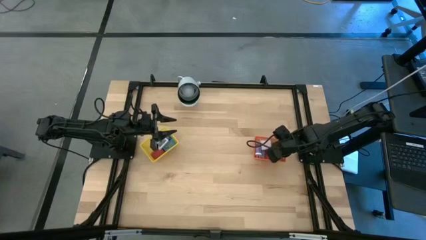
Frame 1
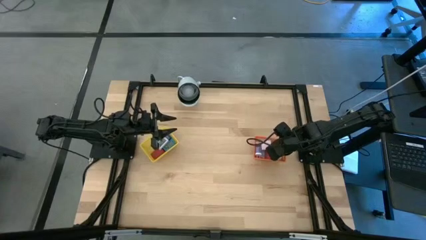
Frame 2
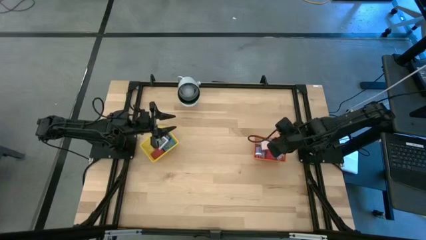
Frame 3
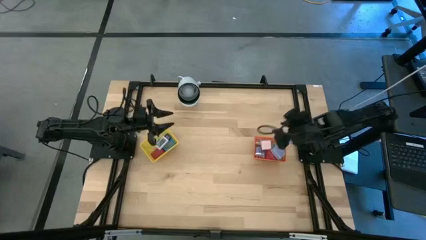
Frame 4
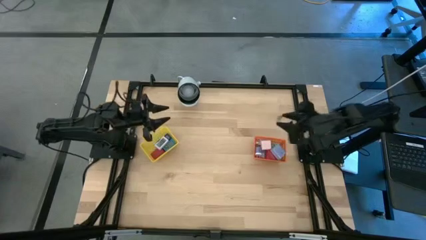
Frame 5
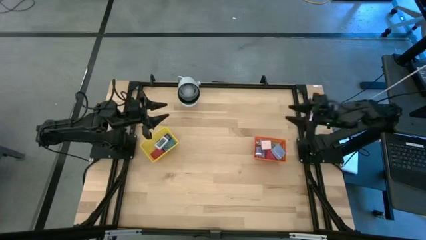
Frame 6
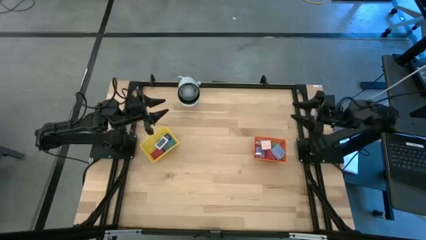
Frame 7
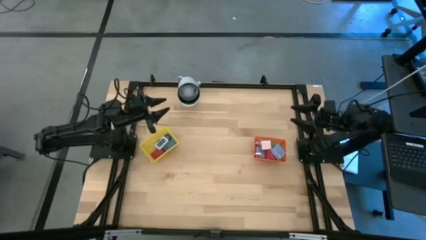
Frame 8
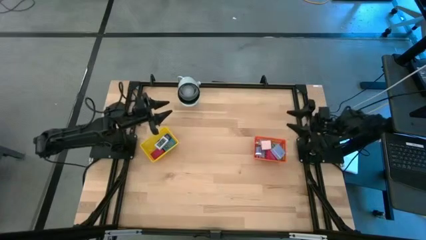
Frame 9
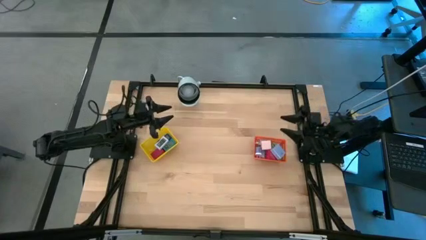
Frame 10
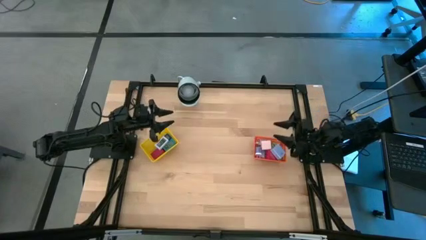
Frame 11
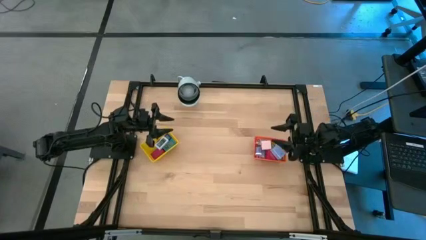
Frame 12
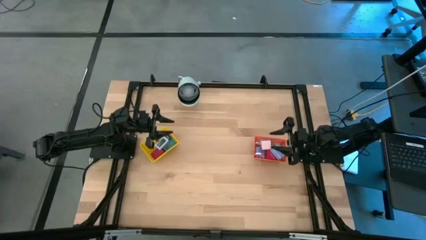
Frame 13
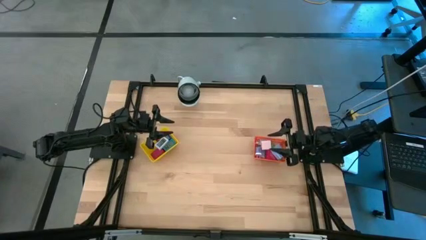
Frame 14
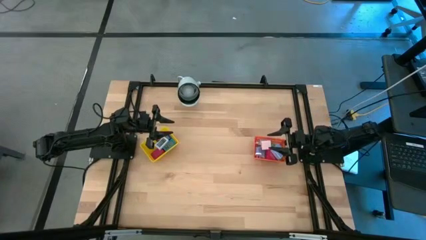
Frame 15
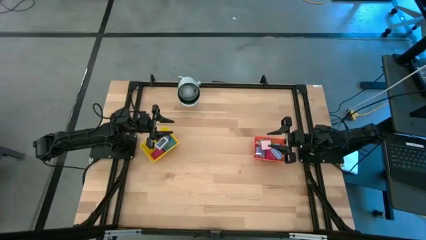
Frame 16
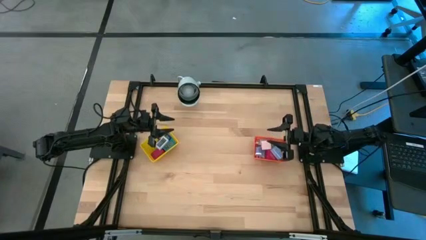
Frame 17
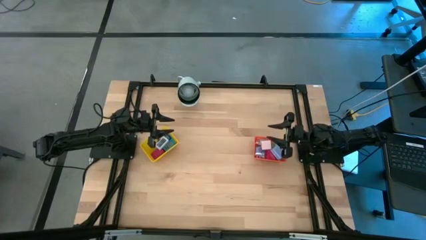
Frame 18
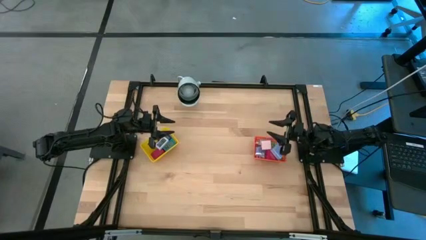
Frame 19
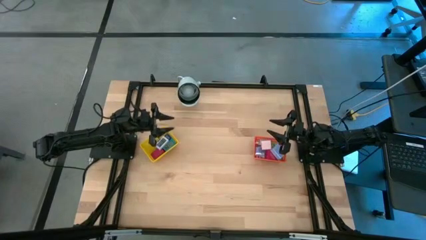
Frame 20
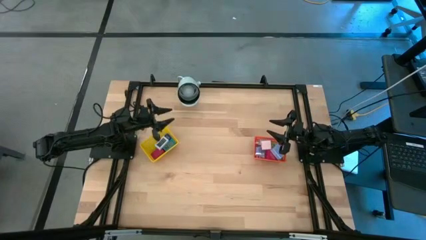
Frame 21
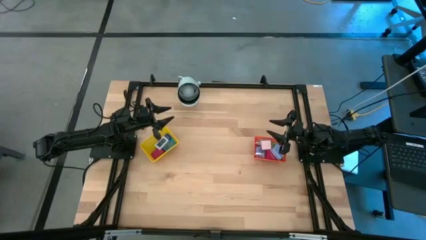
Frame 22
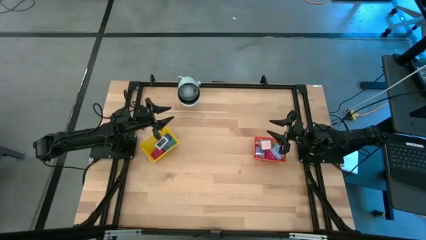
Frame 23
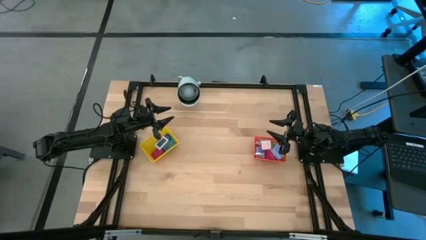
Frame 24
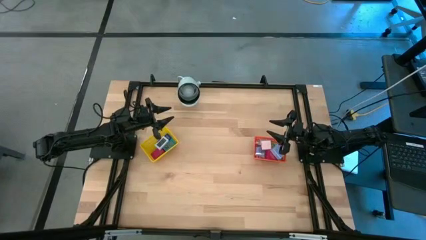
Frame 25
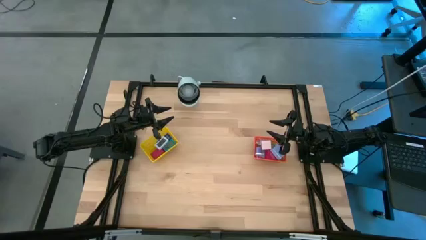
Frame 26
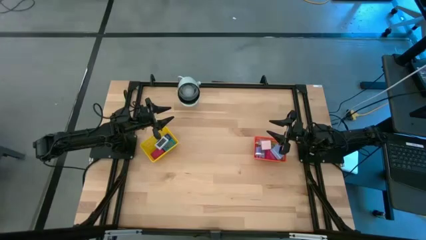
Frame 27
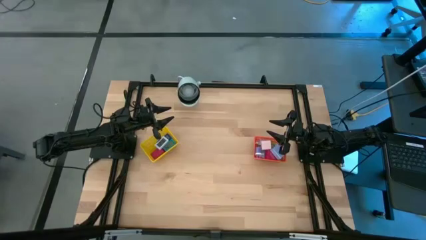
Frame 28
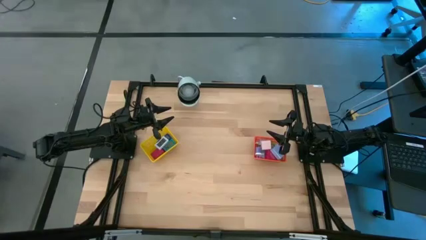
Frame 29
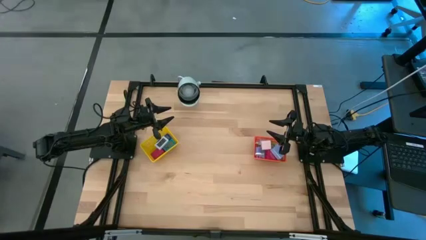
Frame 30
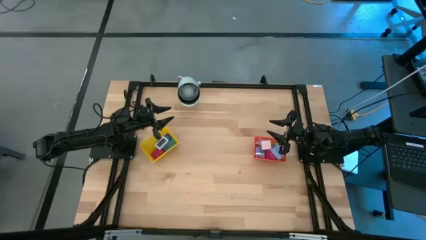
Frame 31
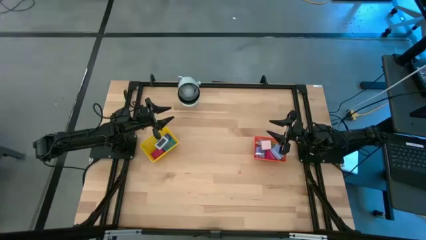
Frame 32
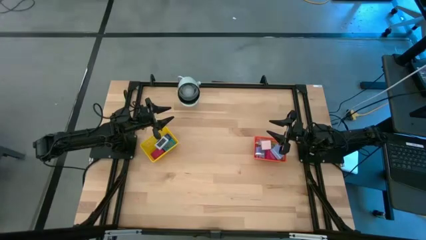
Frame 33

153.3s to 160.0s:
Task: Pick & Place Office items
Return to Home Position

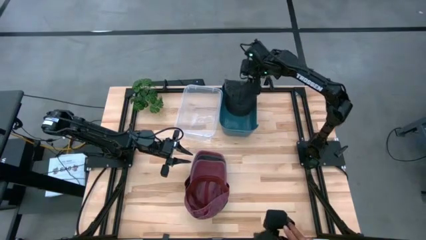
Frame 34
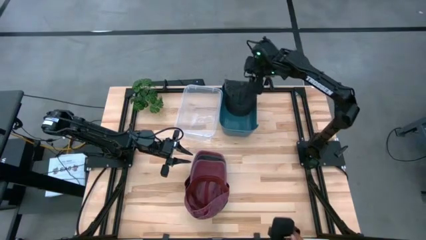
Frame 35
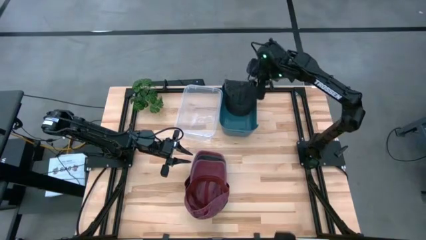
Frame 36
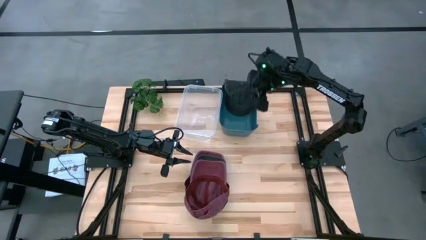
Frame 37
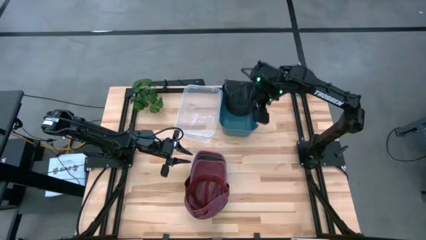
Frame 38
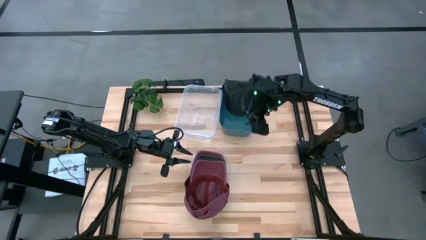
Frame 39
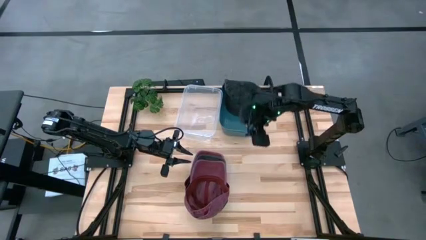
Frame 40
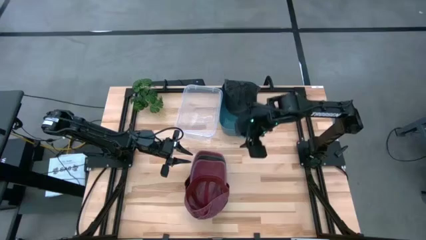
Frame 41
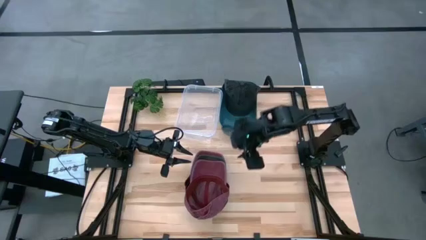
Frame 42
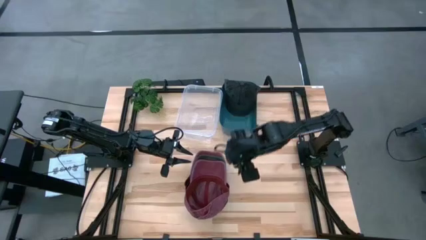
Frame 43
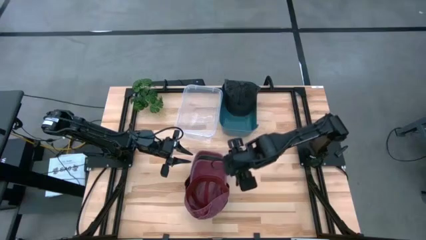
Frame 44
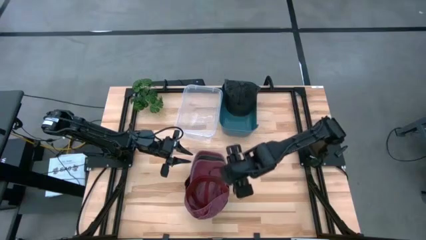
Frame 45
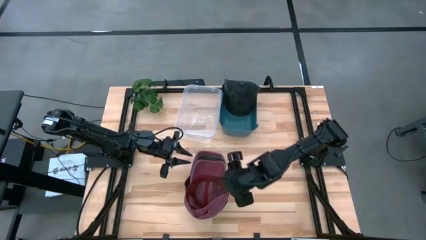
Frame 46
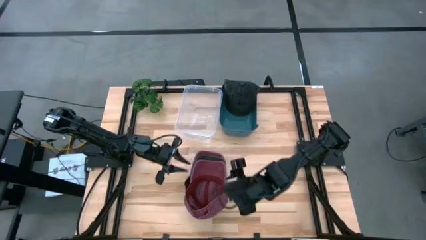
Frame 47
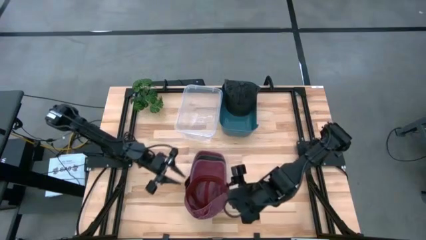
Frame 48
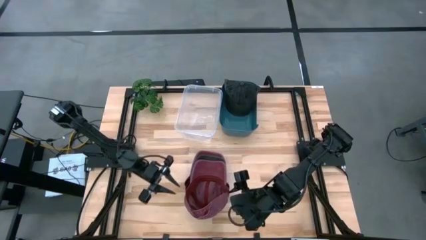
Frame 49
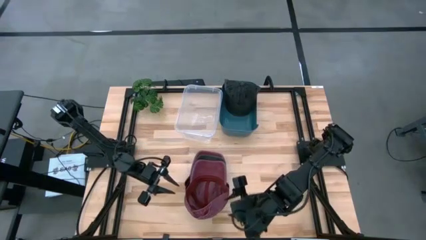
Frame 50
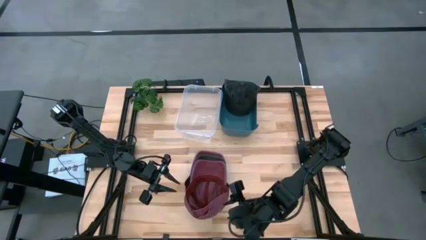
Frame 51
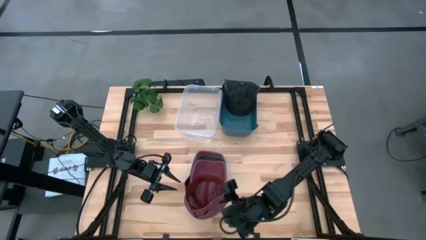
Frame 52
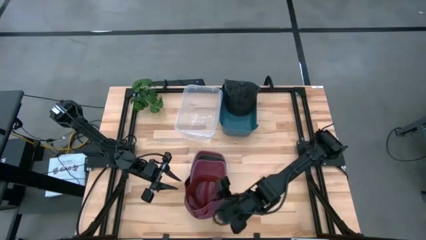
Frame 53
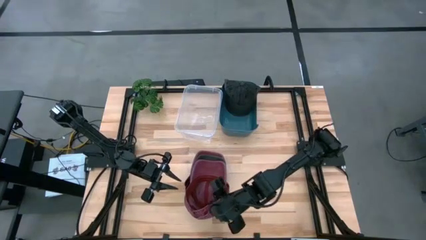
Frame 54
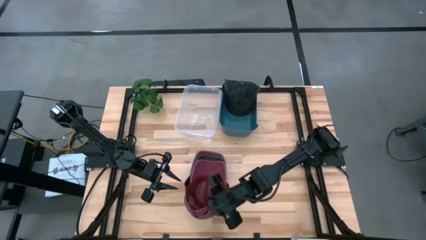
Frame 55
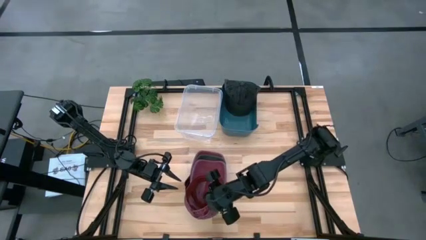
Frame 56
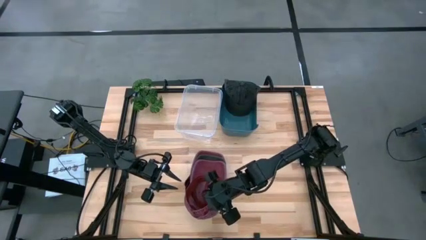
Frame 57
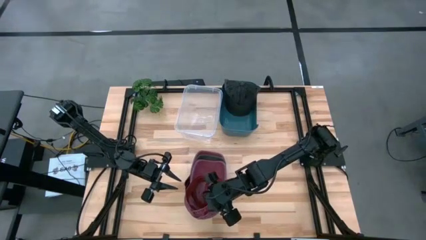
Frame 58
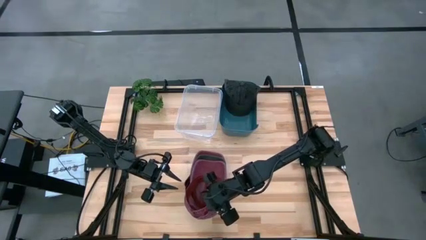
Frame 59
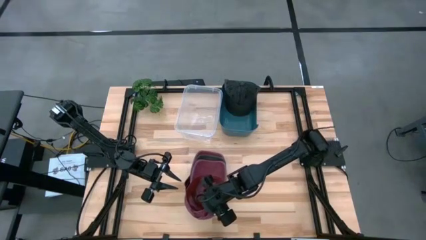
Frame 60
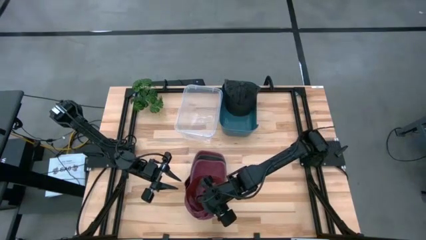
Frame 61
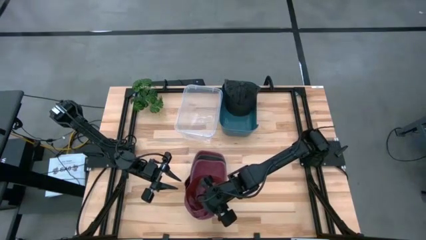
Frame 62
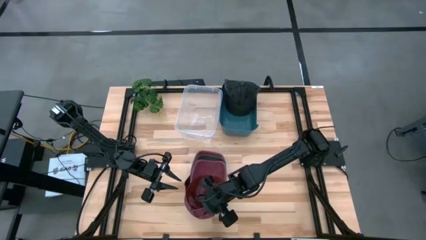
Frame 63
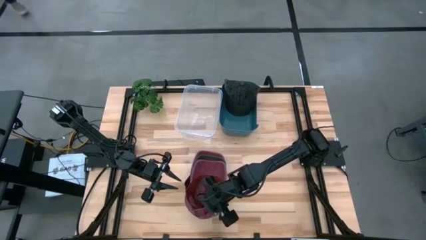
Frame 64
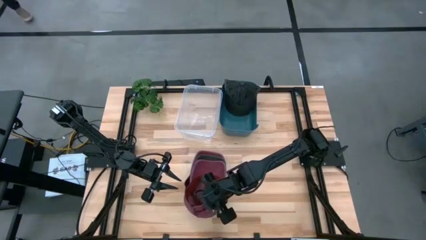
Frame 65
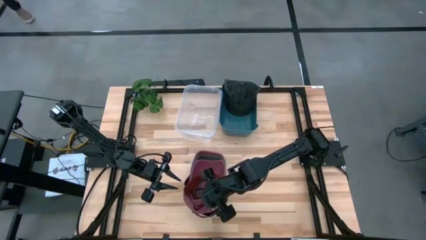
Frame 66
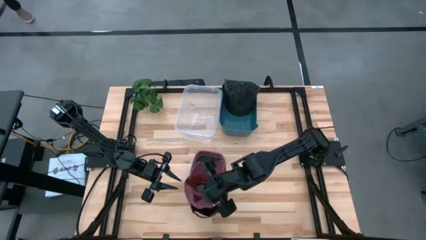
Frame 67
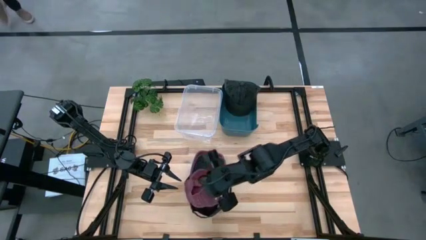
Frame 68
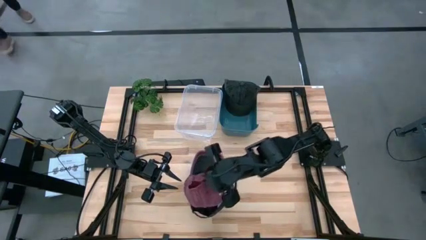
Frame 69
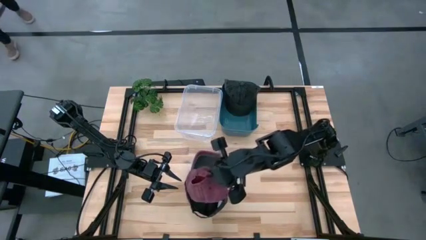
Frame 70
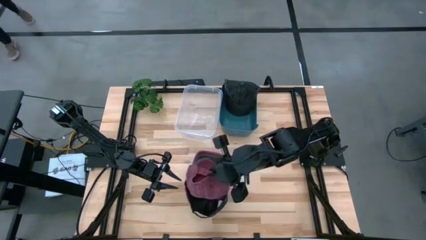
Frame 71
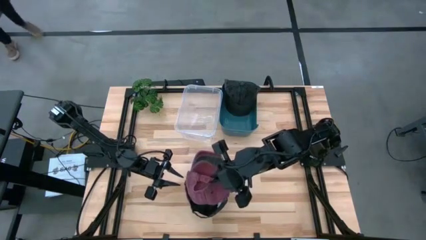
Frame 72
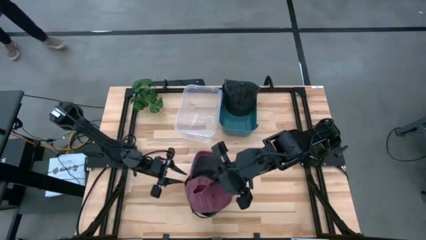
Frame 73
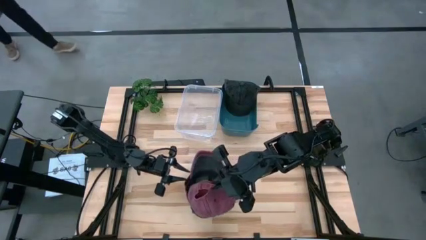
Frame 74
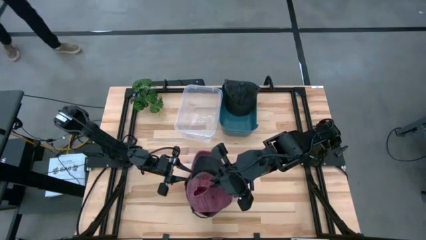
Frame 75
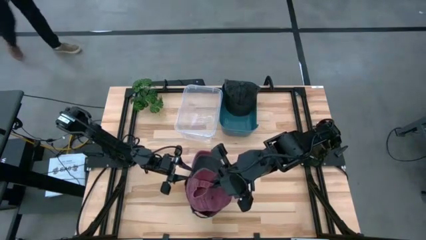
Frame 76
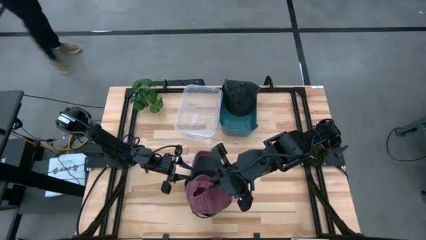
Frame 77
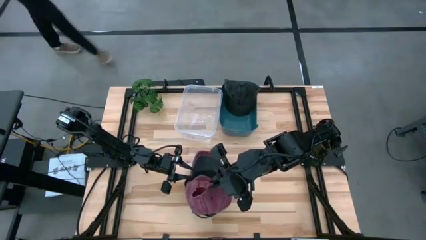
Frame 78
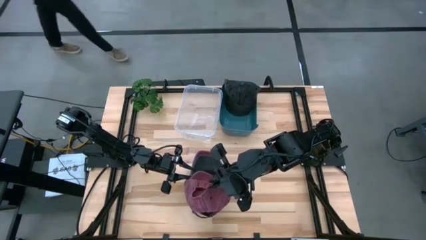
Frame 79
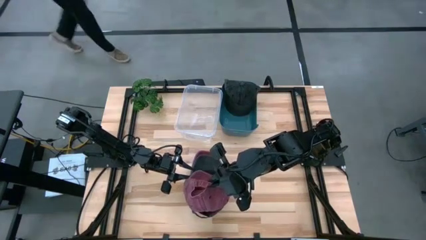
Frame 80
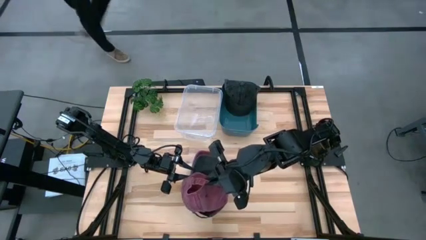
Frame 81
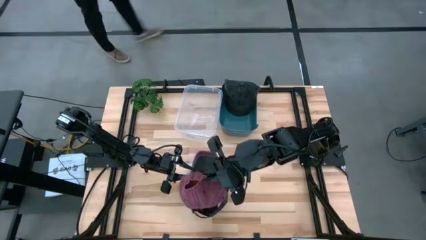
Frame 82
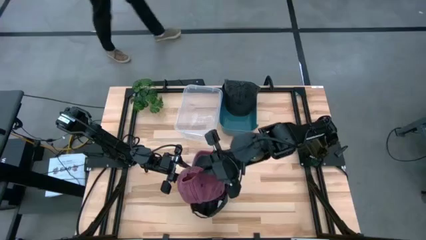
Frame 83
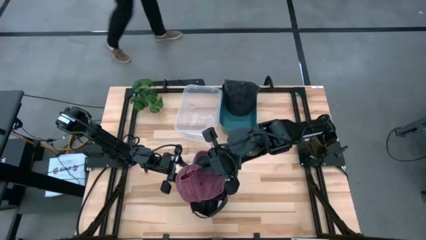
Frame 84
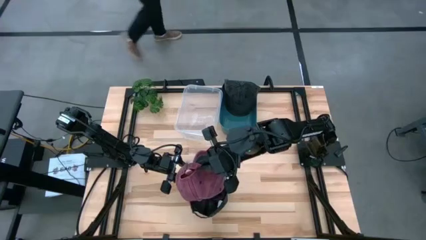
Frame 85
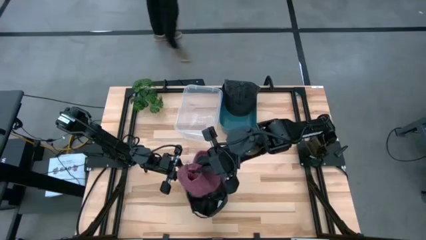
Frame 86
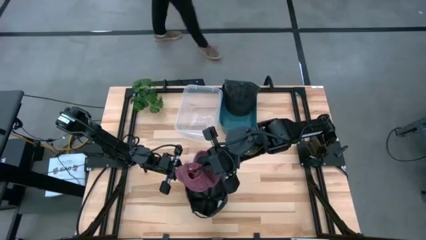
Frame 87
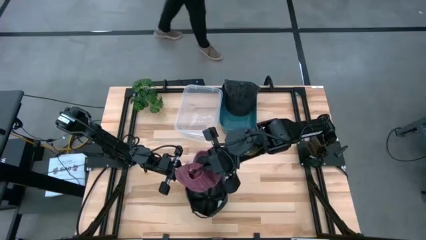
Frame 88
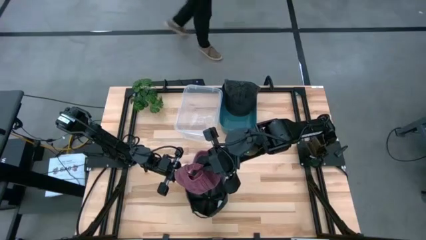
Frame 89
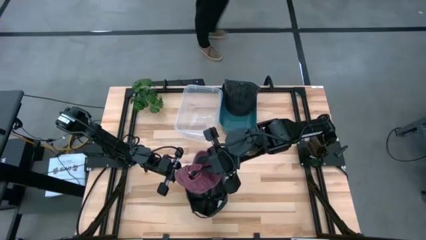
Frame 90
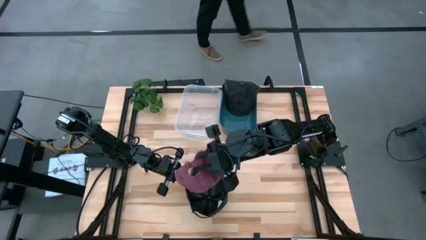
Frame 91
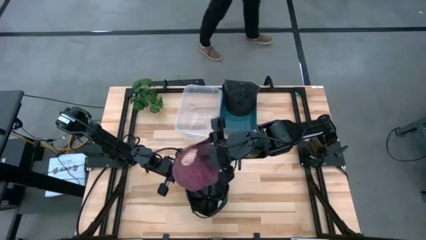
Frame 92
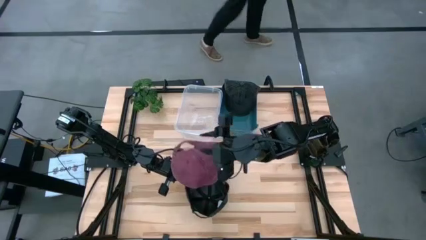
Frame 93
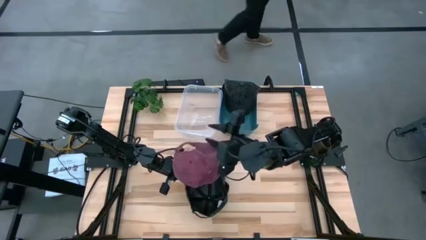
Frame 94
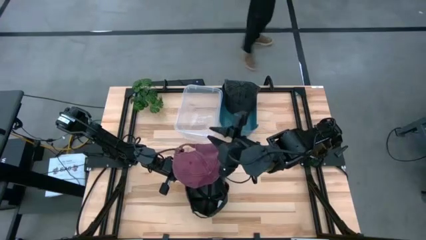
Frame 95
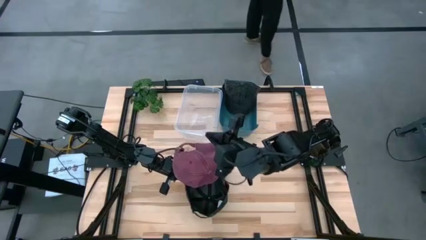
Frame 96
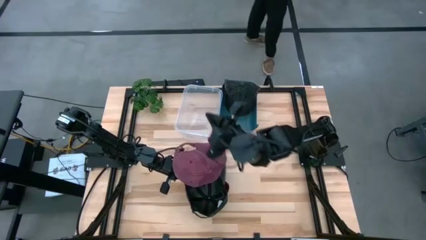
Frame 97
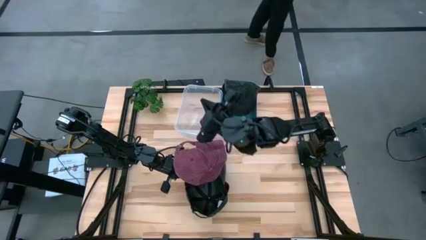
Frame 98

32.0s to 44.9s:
Task: Pick & Place hat
Put the top red cap into the transparent bin
